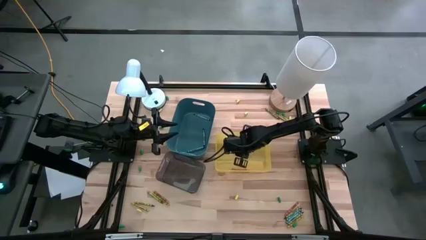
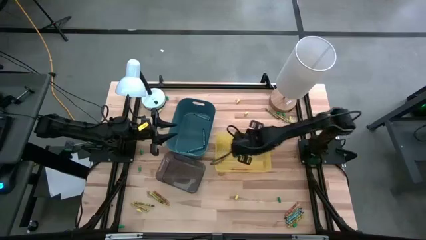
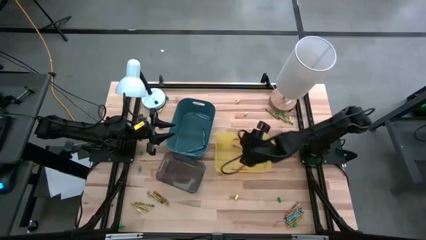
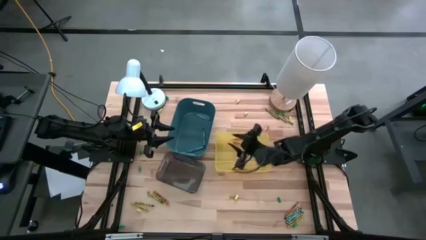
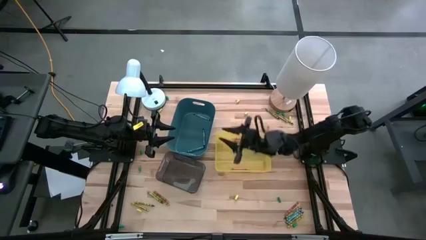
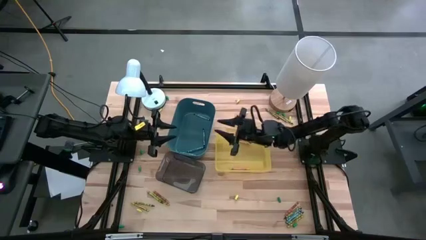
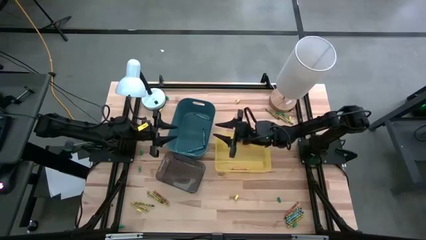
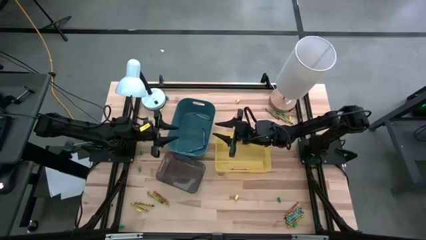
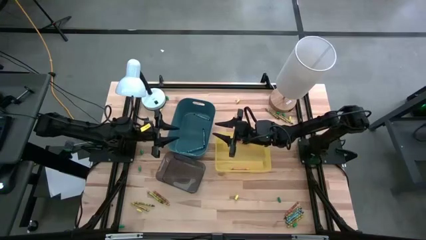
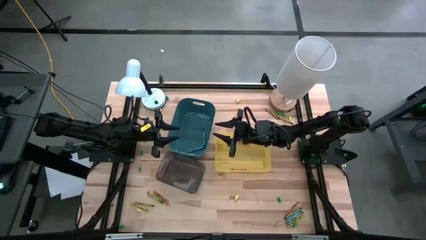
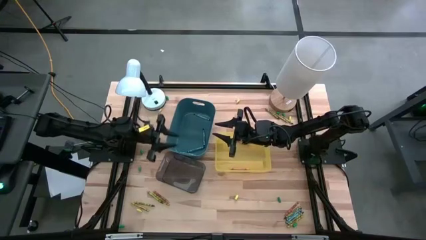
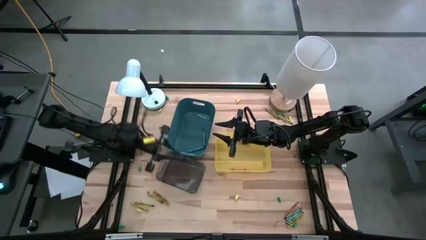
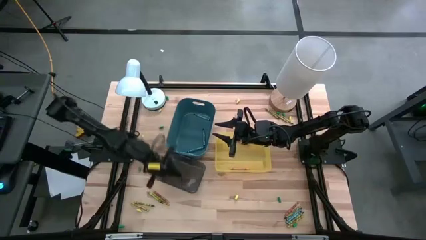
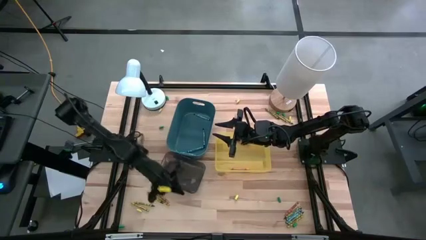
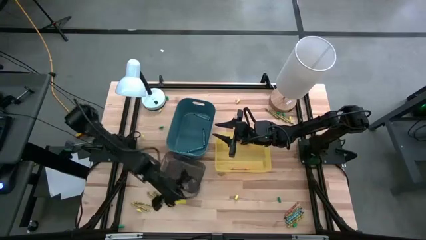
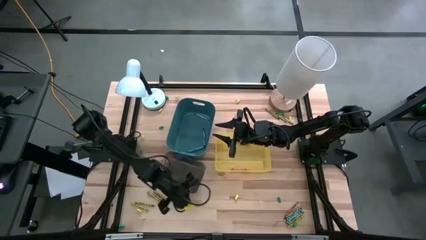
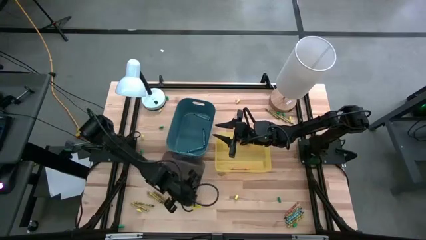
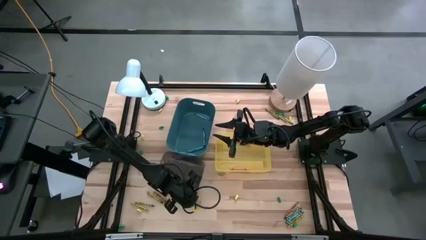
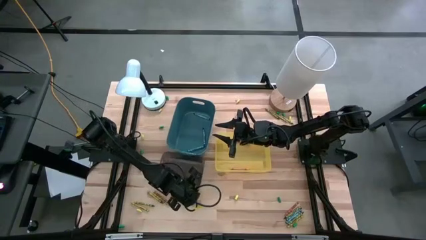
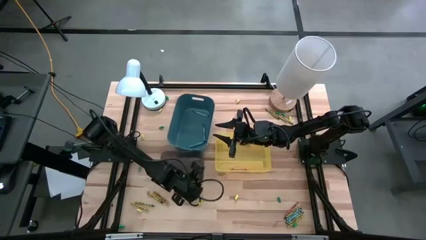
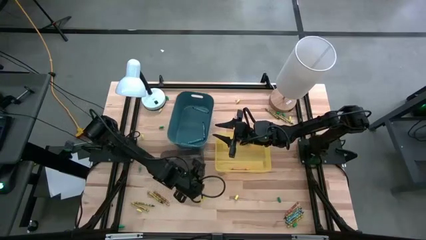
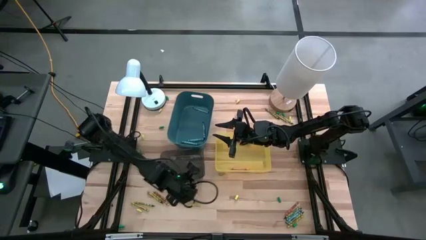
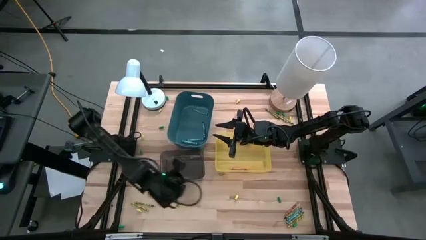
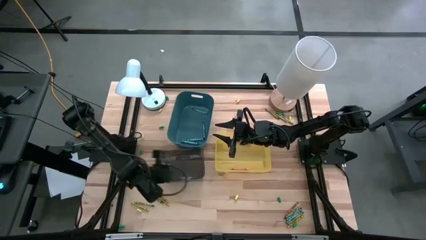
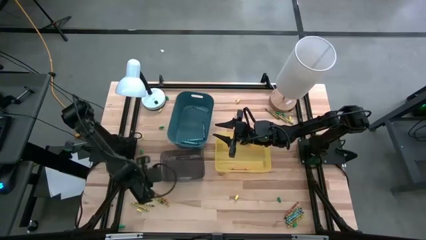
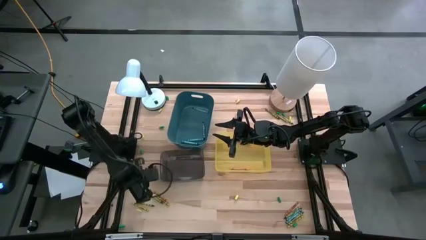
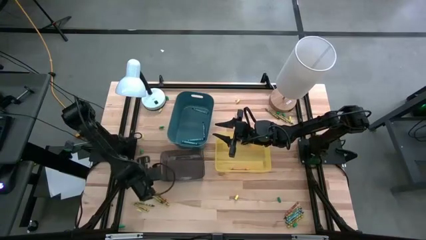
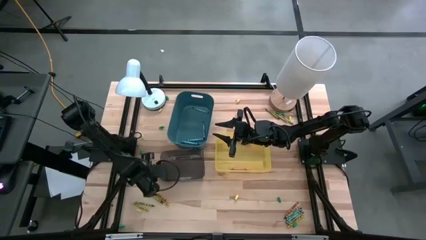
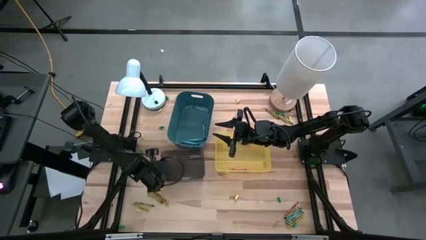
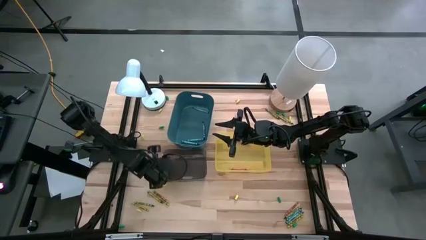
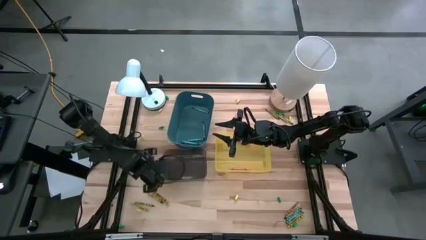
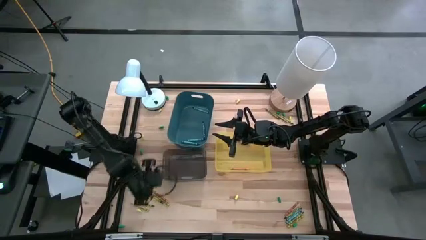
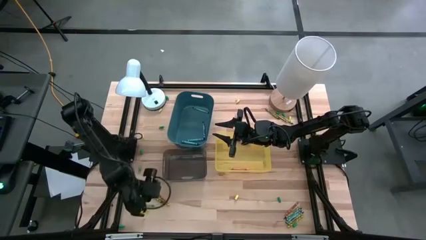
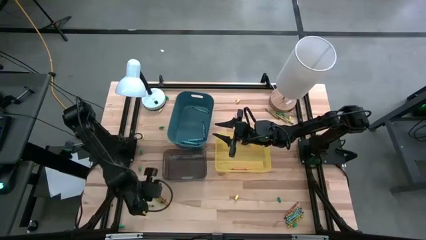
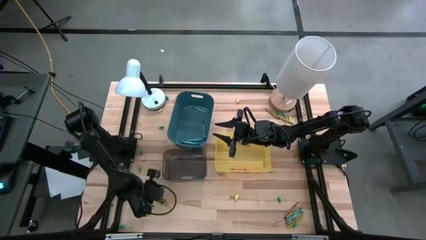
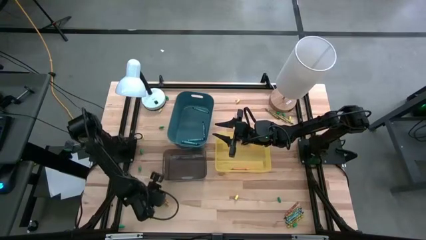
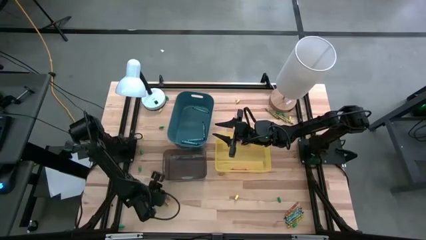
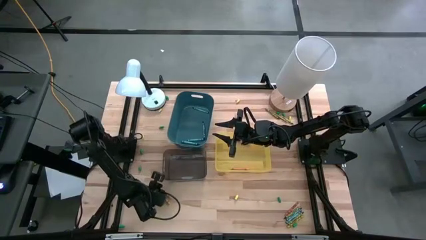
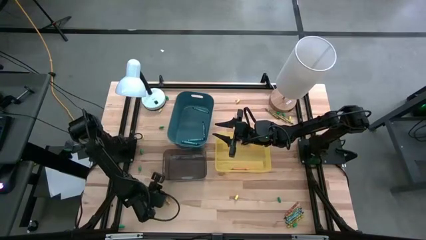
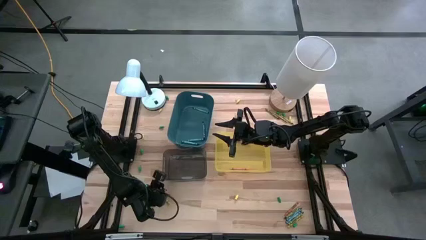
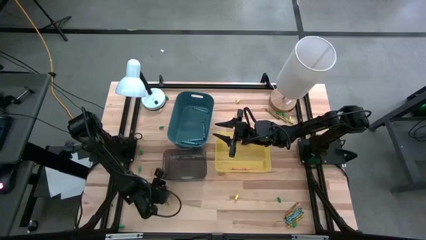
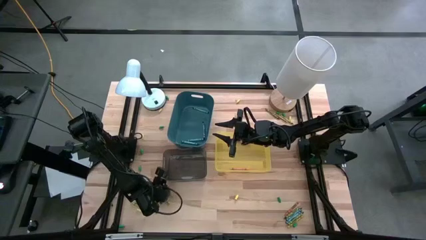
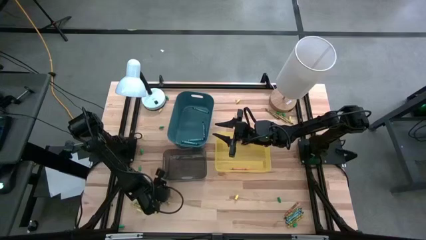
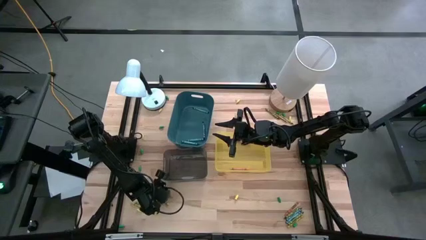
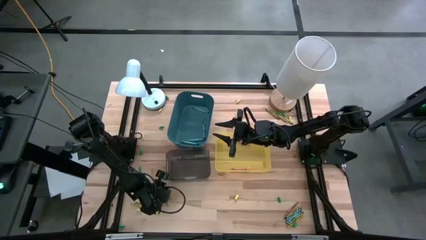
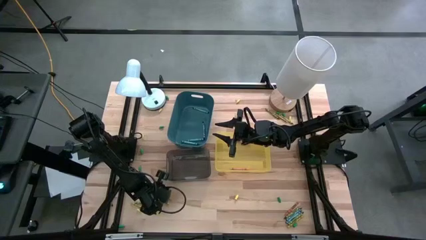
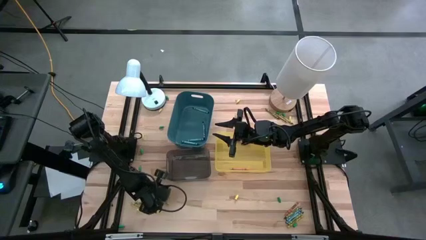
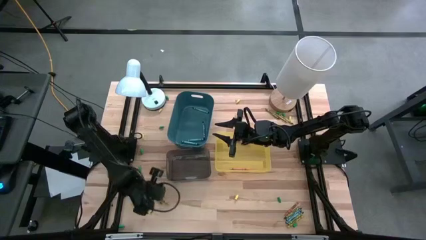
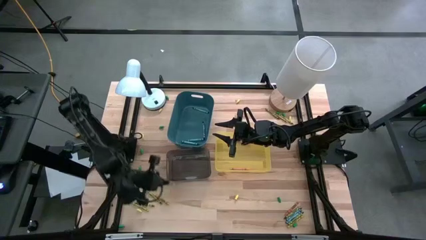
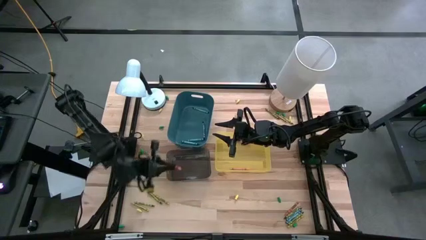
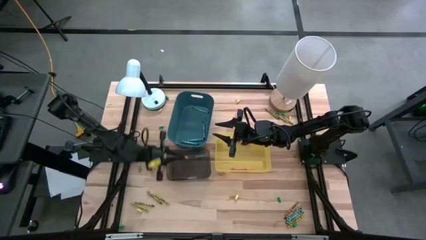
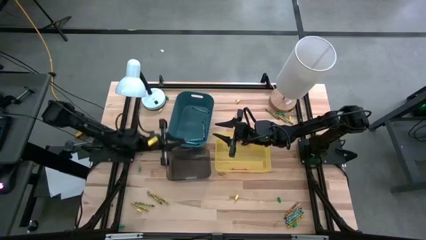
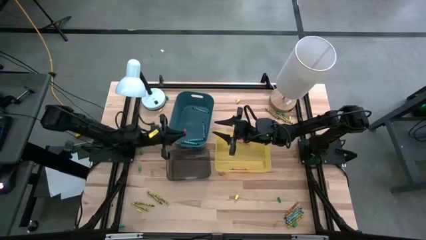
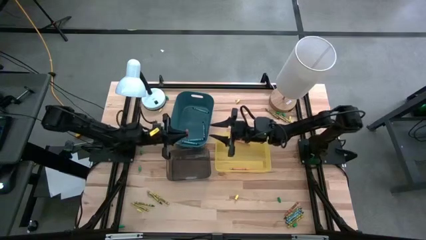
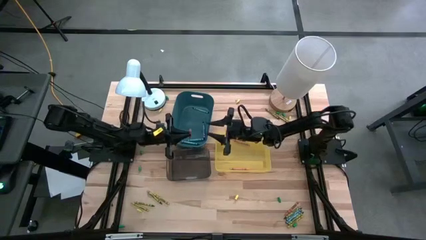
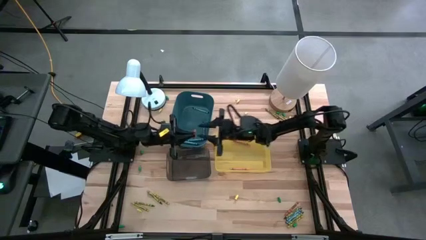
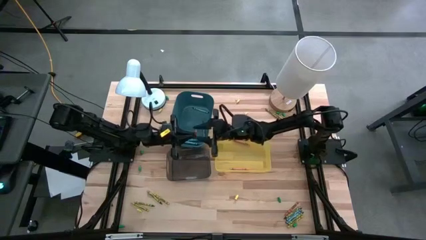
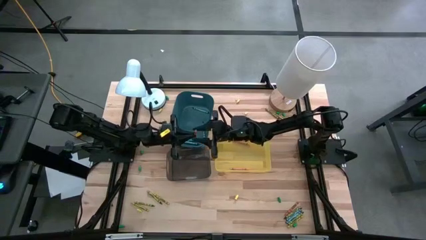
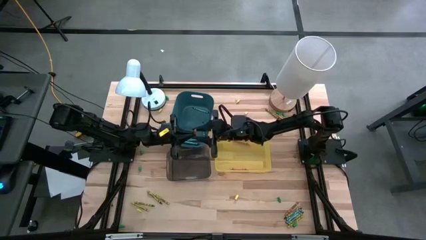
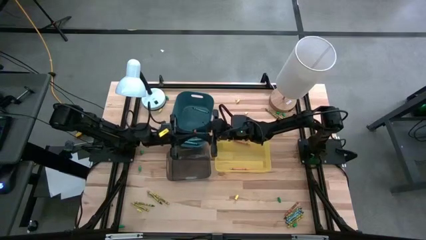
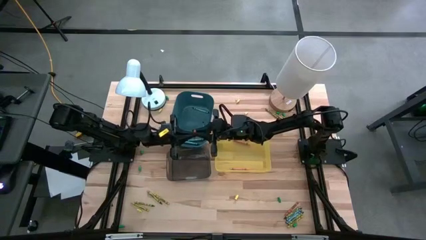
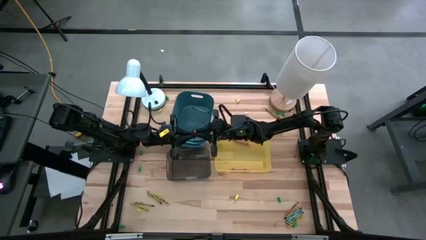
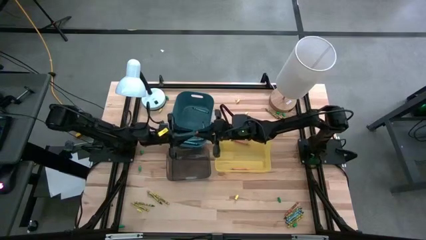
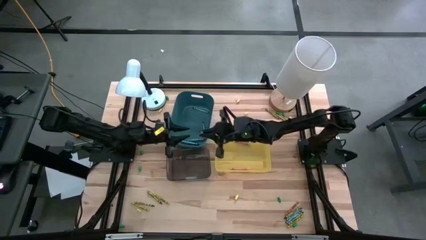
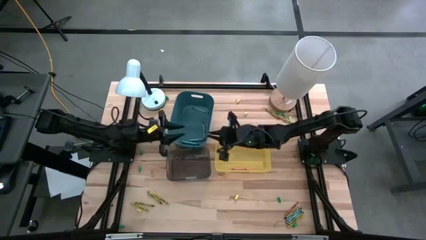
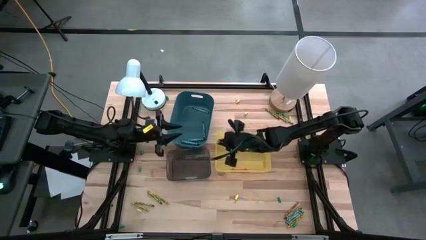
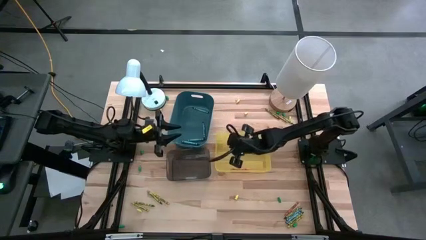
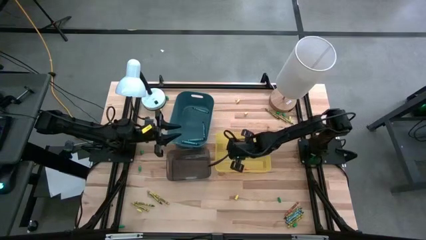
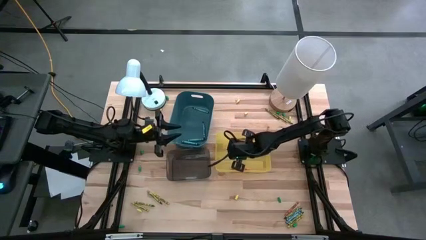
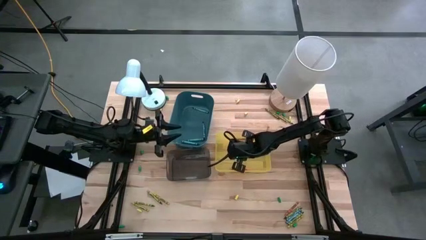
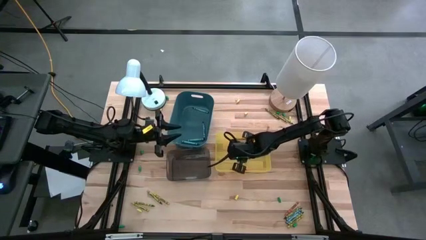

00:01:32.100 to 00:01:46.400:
Task: Sort crayons
Put the orange crayon into the yellow bin

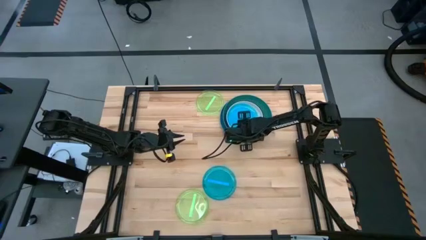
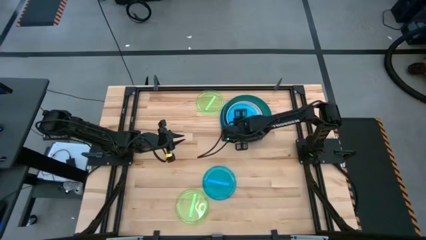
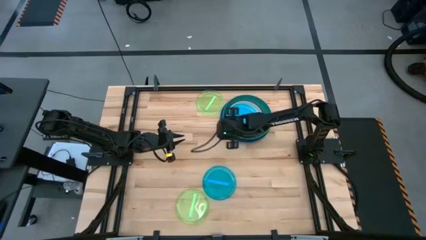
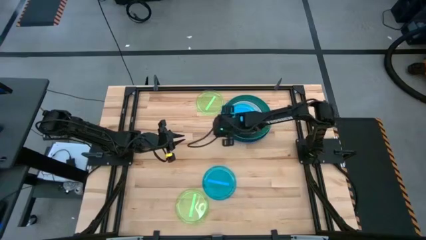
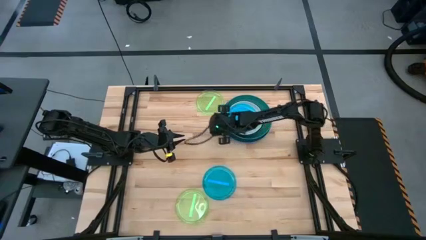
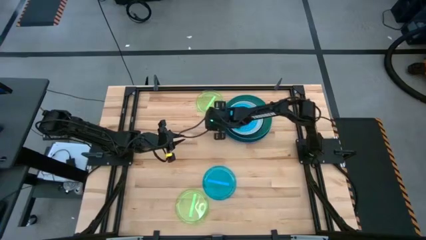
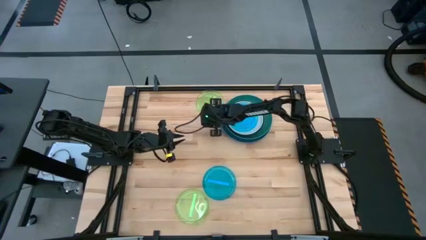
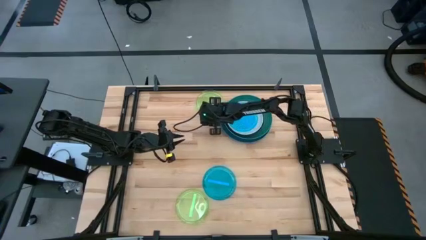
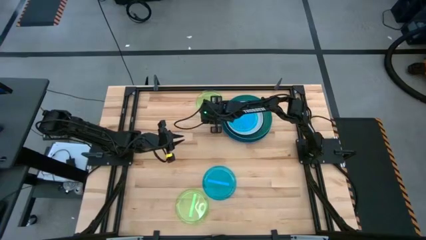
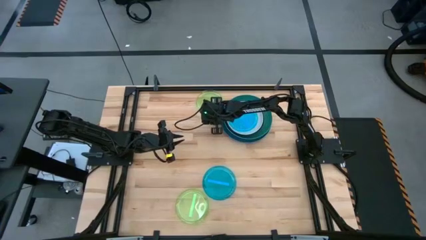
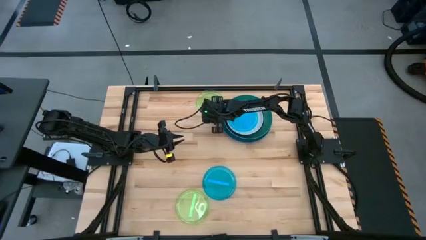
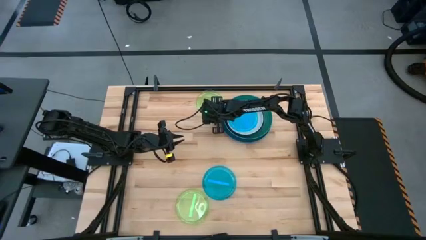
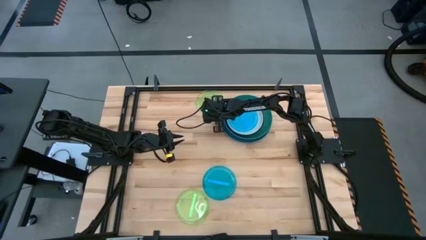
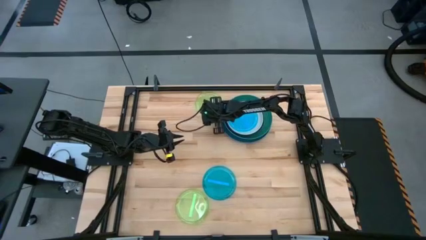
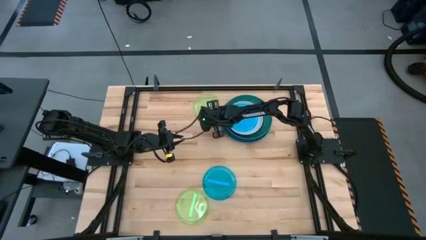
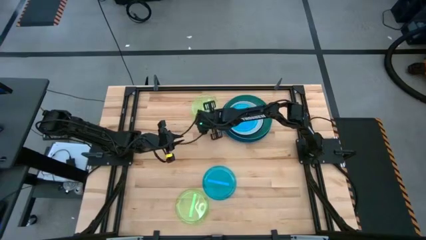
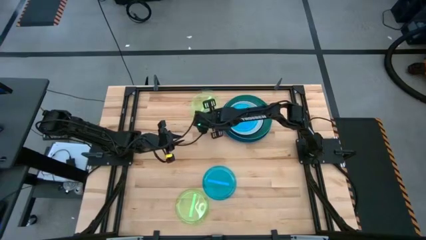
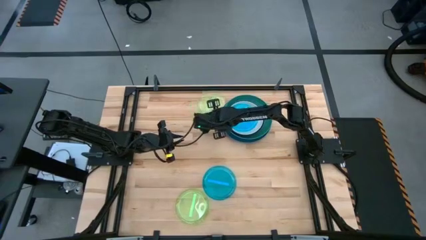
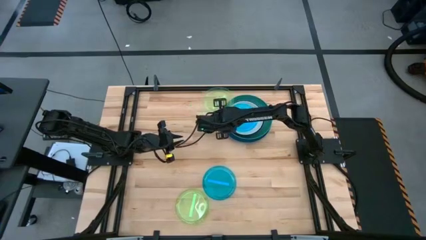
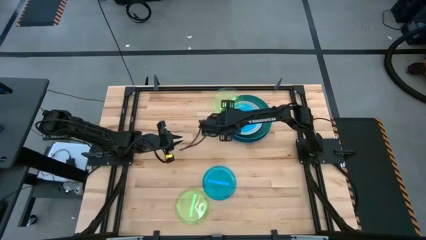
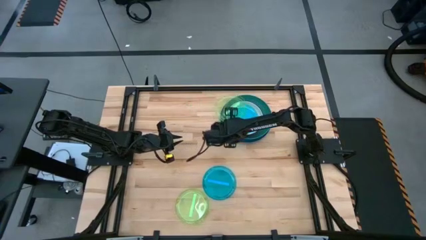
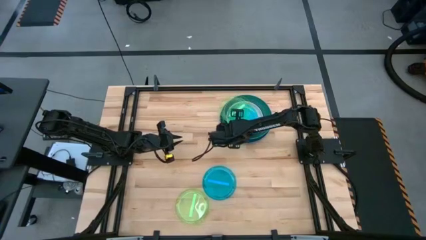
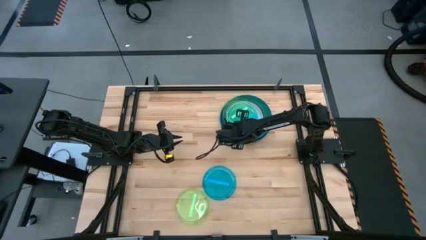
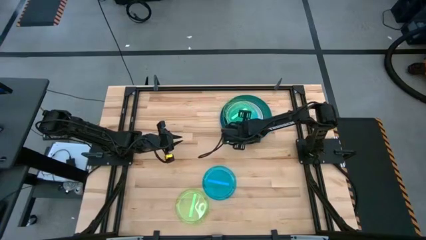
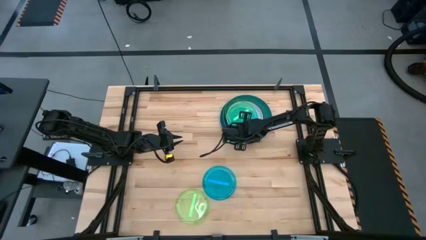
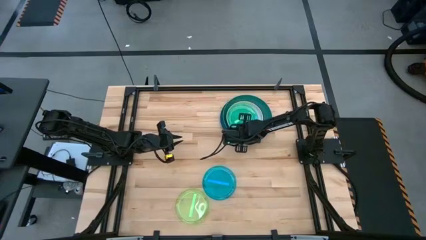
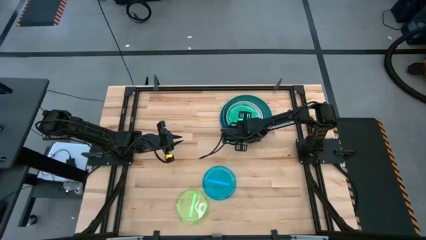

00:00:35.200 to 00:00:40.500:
Task: Stack plastic plates
Stack the top light green plate on top of the light blue plate
